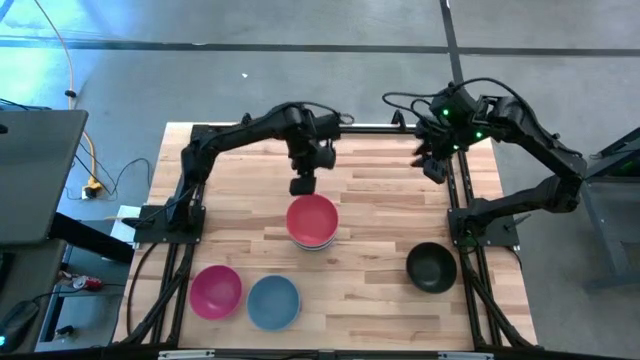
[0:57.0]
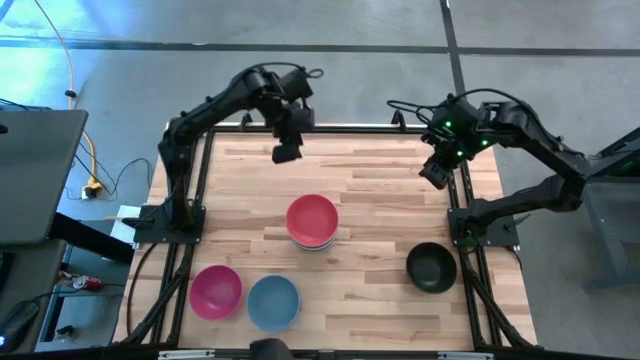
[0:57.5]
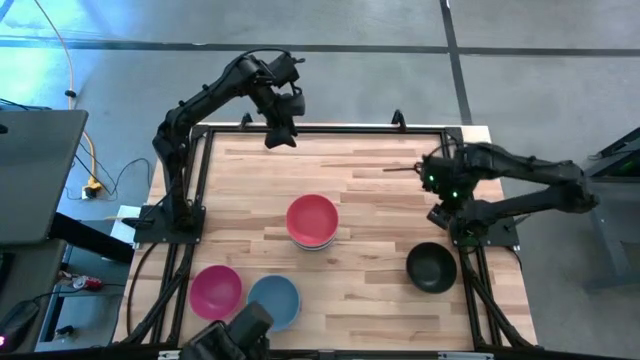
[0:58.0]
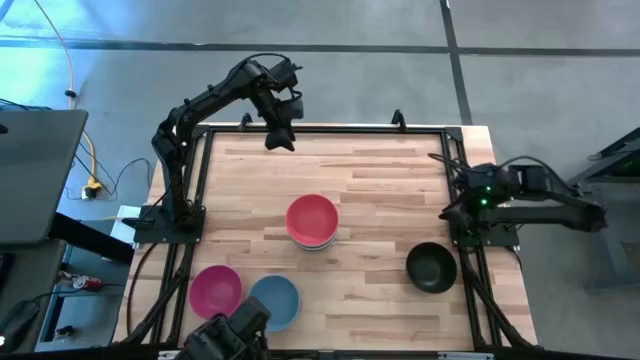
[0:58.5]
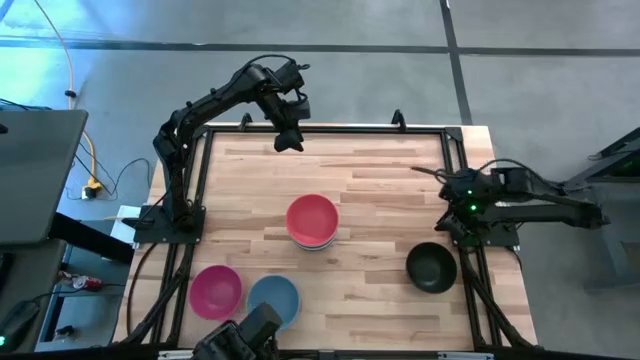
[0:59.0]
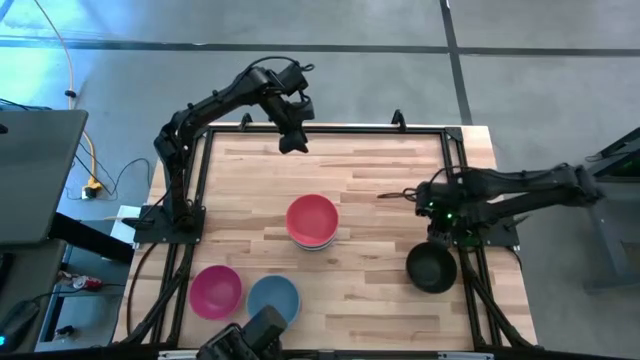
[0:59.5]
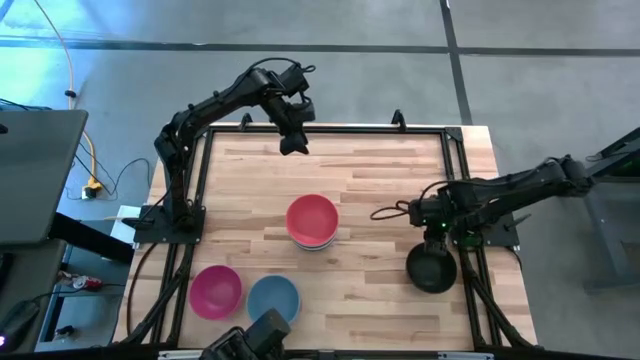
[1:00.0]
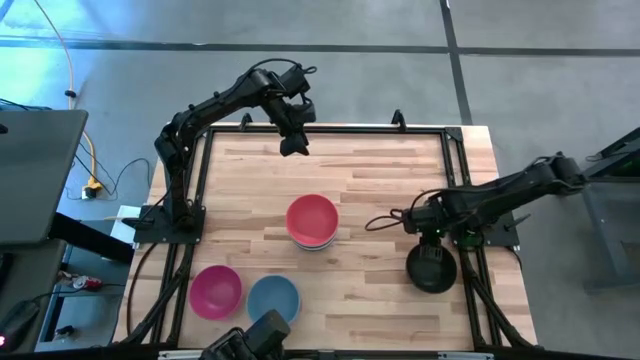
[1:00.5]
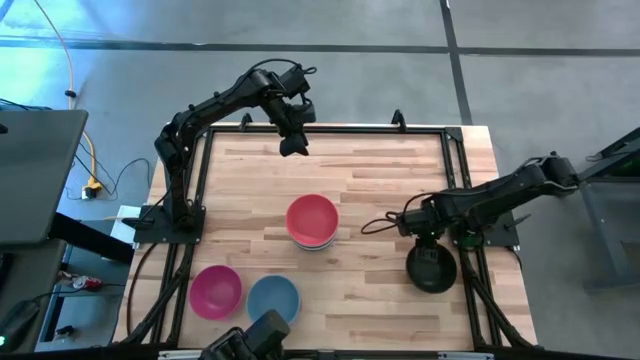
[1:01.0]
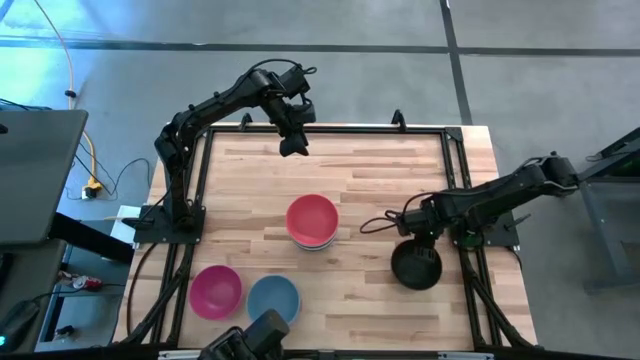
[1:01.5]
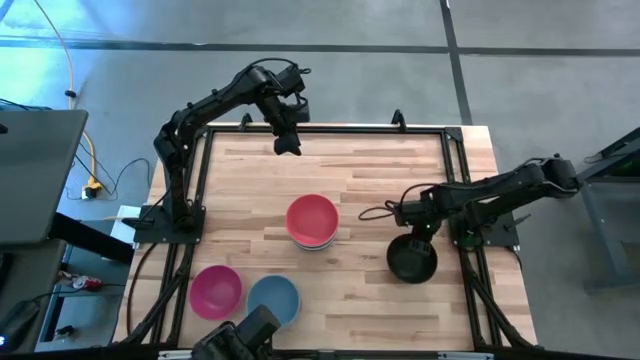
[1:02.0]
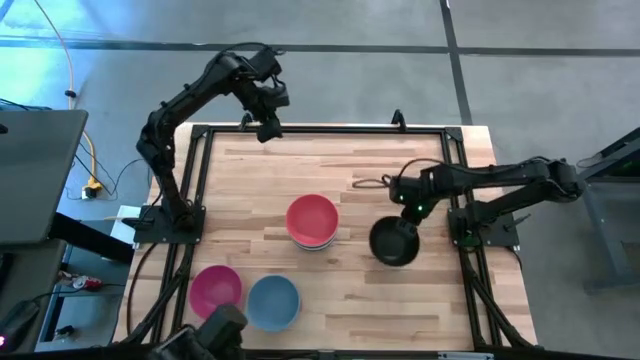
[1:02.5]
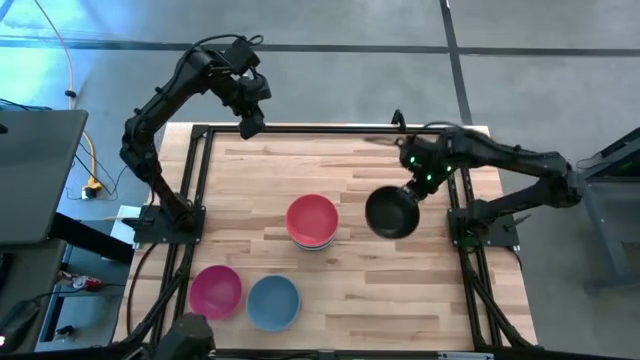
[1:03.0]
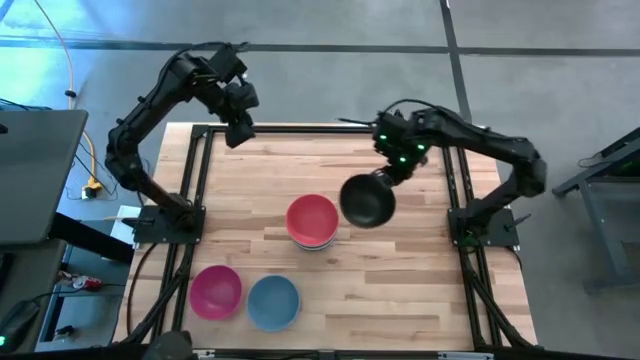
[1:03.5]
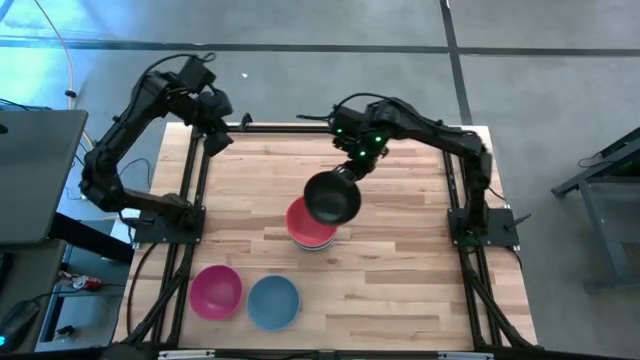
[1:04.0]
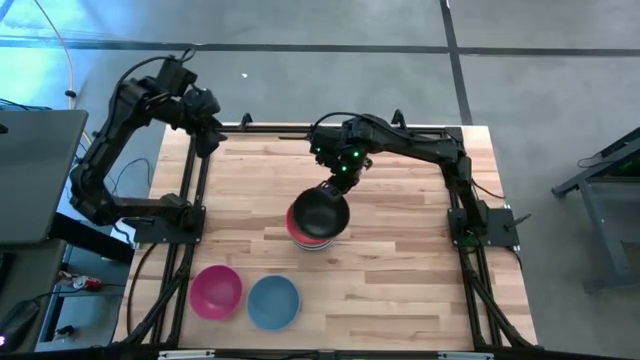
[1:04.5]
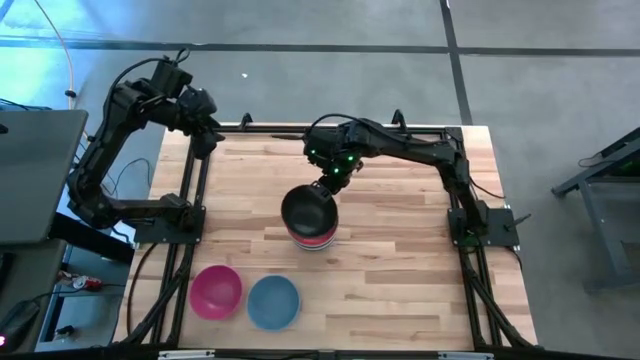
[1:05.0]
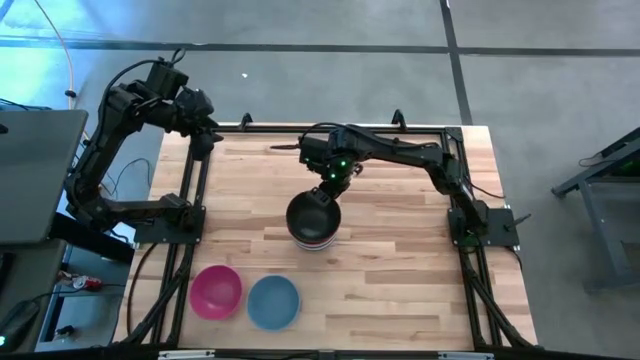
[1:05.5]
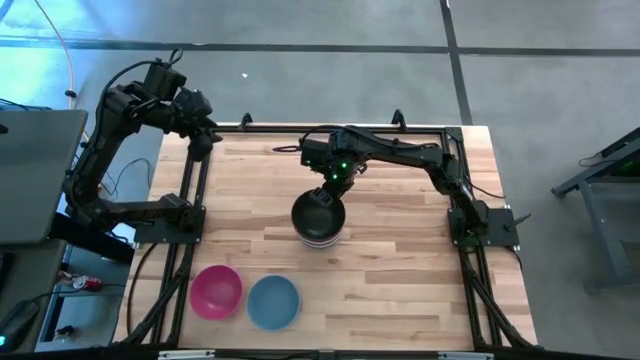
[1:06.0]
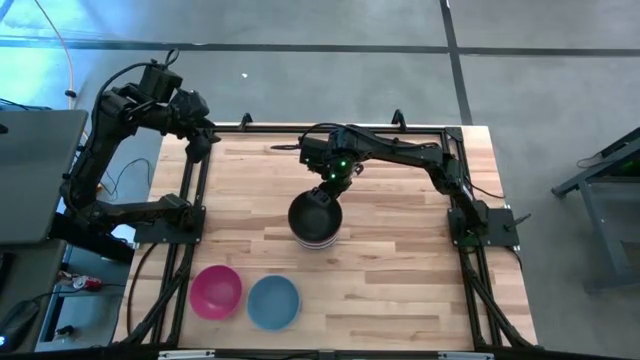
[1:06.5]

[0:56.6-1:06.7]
Task: Nest bowls inside each other
Stack the black bowl on top of the orange bowl

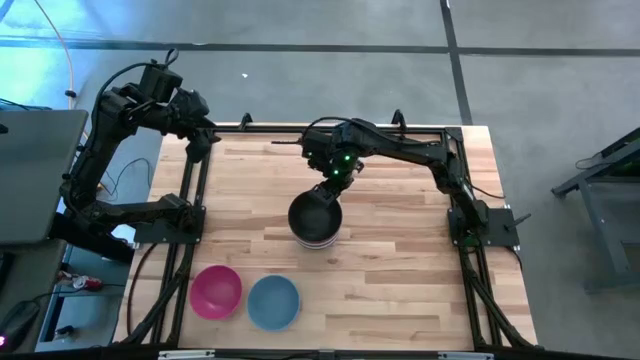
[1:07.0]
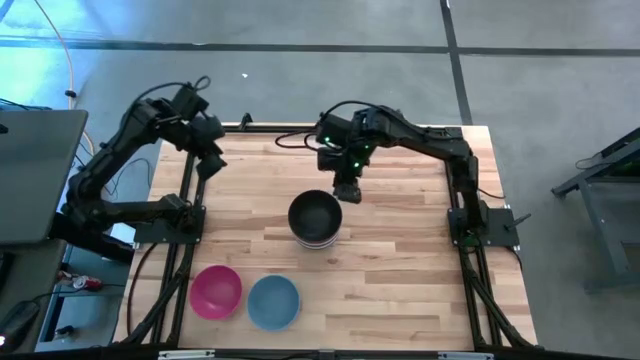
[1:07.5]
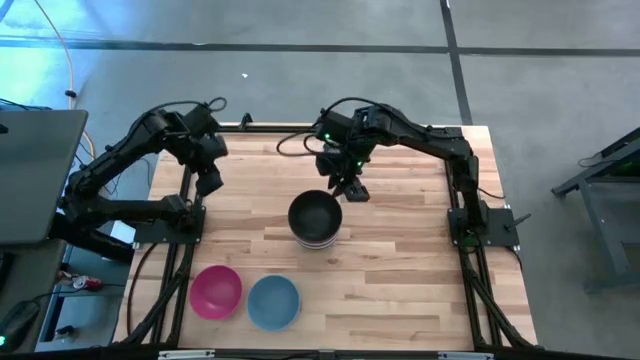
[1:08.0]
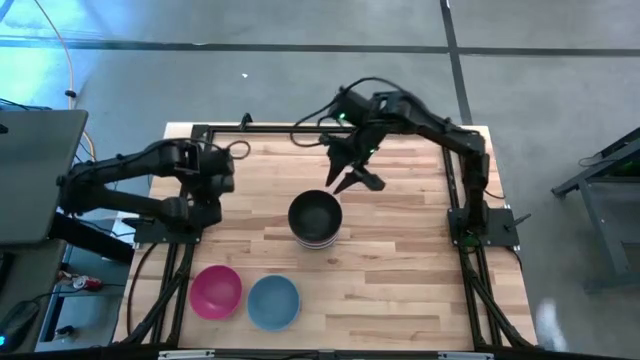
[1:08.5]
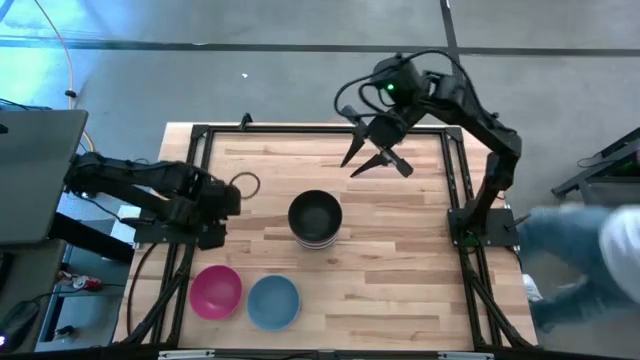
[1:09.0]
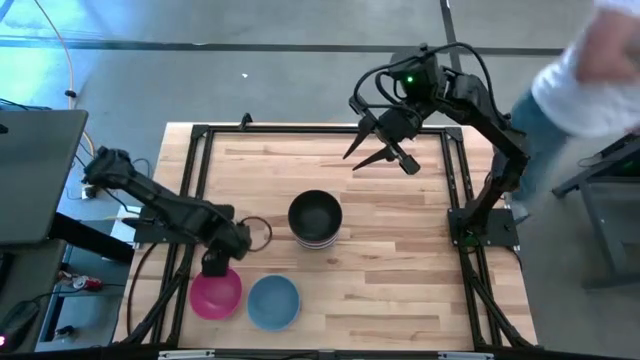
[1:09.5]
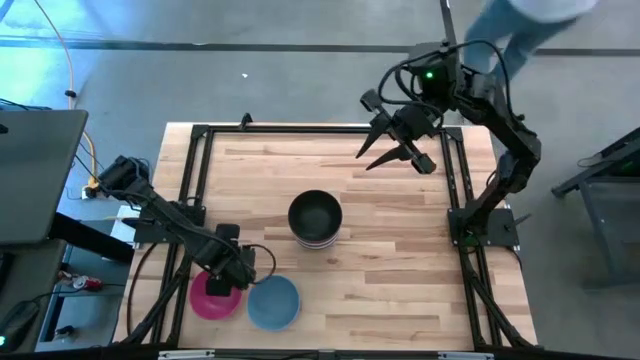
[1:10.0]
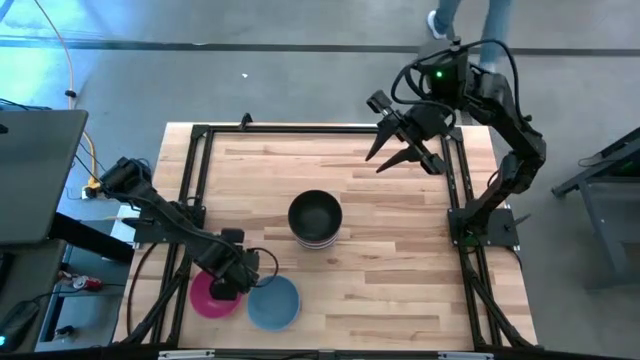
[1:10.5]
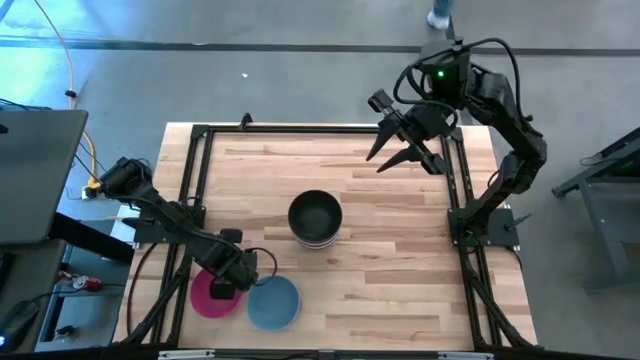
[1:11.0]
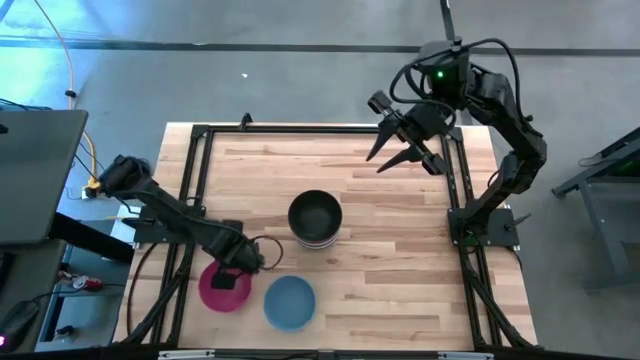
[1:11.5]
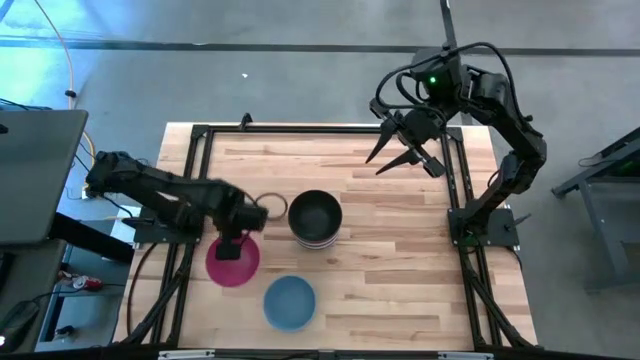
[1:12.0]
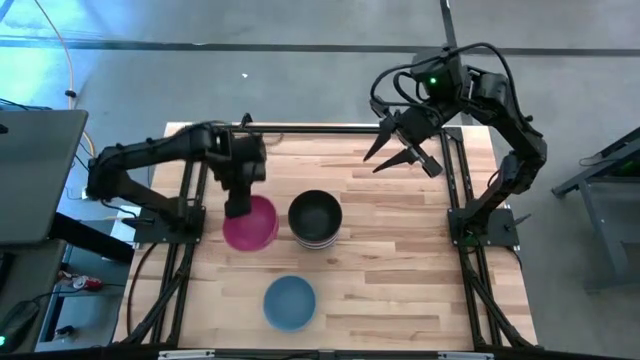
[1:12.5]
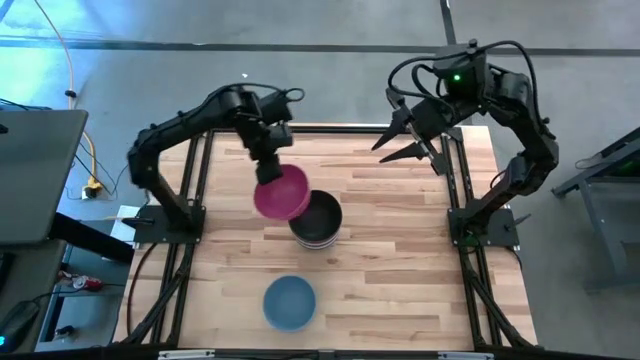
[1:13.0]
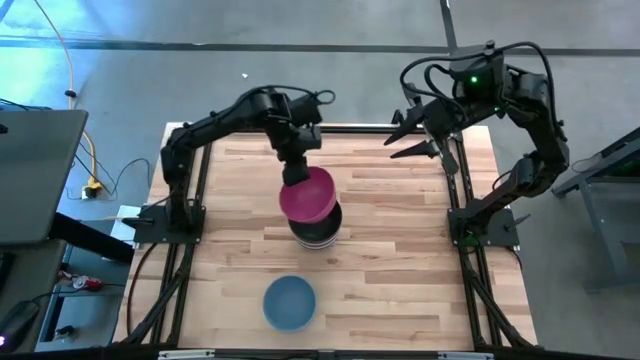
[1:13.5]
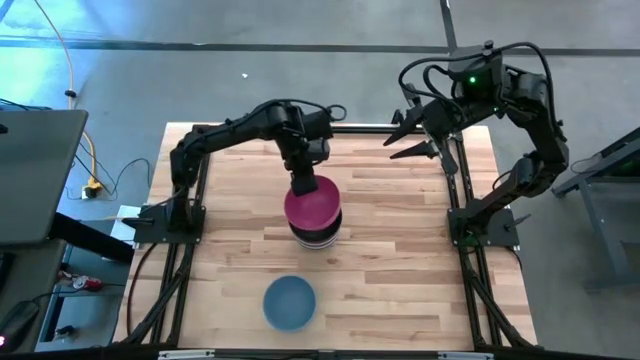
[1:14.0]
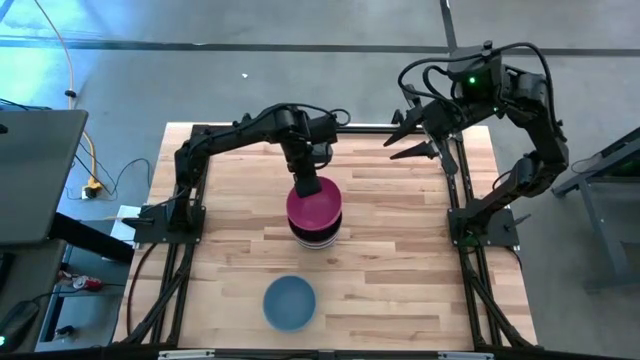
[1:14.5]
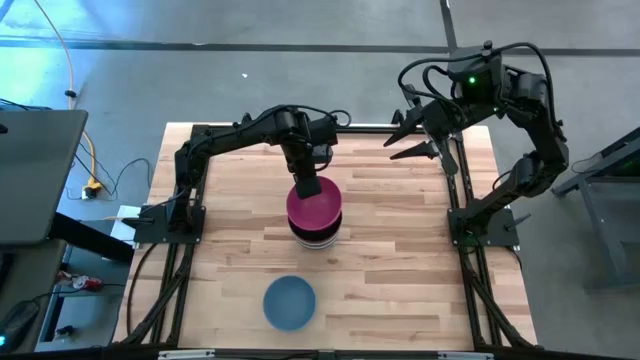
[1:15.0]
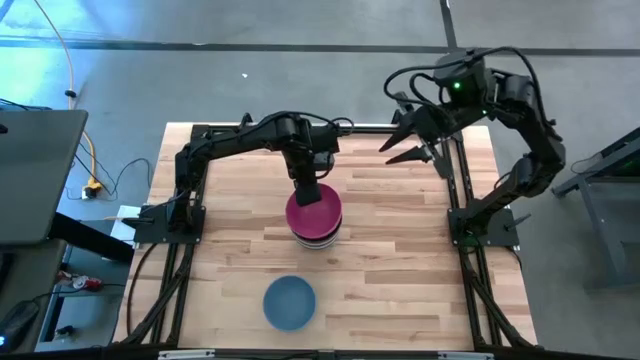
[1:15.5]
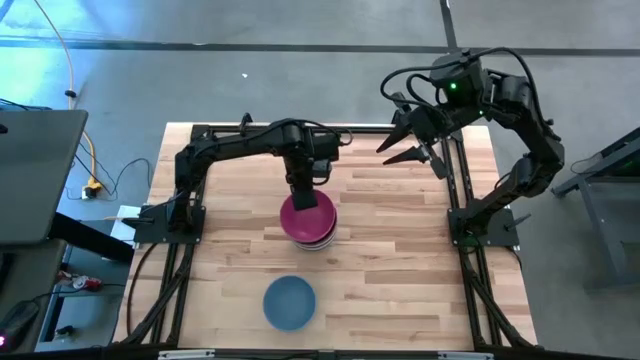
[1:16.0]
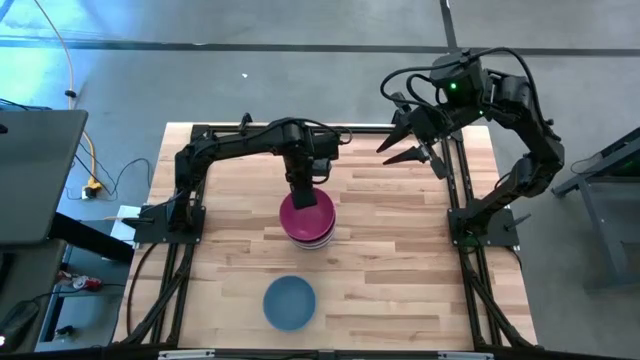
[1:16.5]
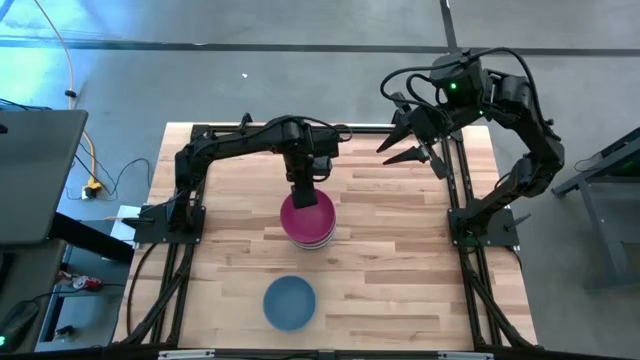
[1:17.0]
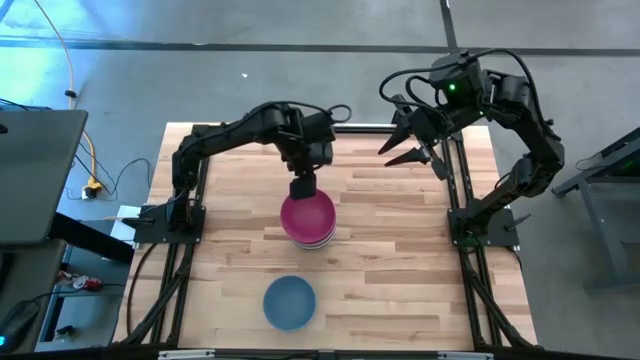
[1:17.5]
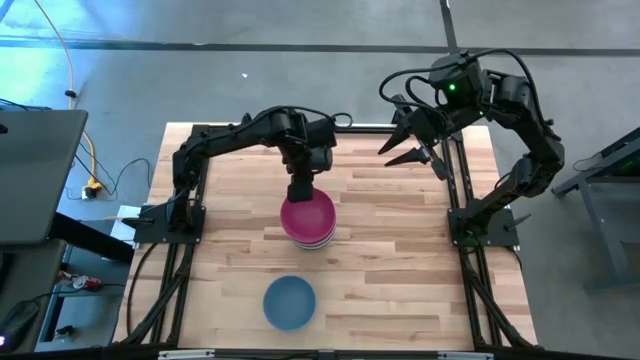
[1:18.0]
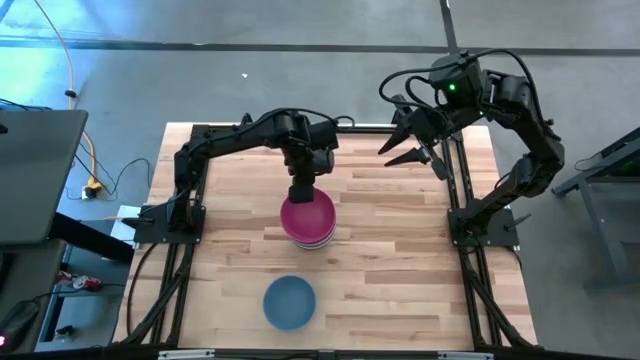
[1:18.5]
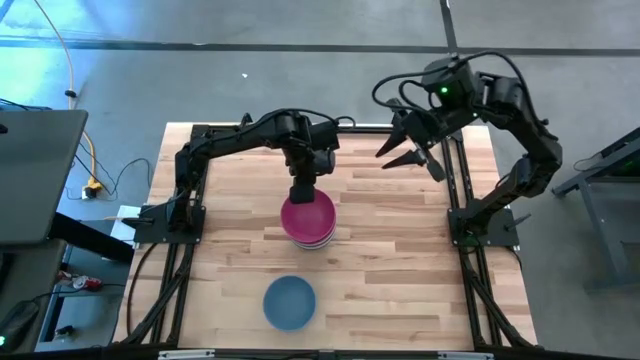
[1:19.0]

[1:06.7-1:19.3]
Stack the pink bowl on top of the black bowl
